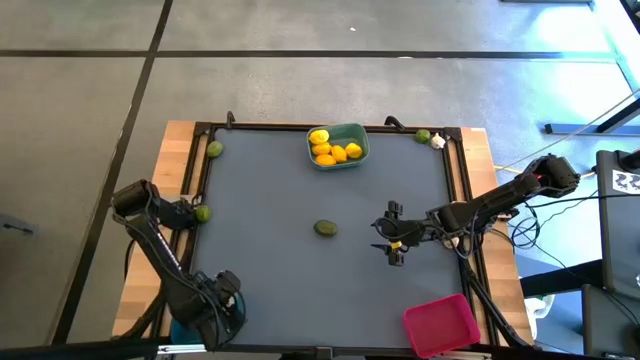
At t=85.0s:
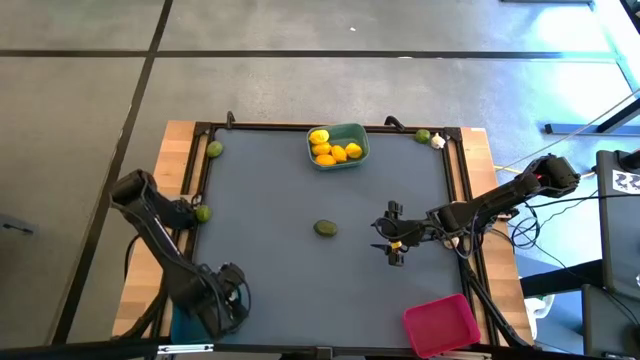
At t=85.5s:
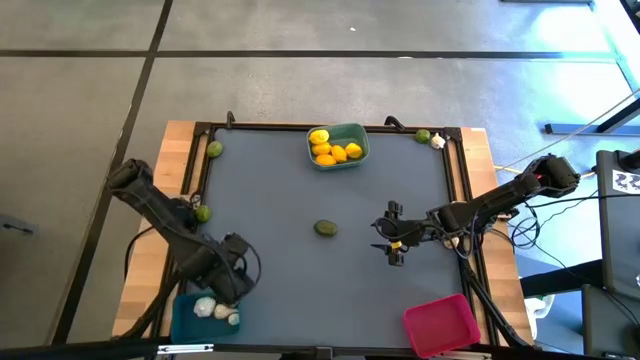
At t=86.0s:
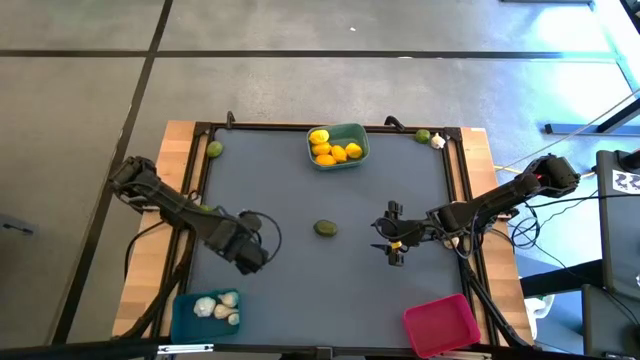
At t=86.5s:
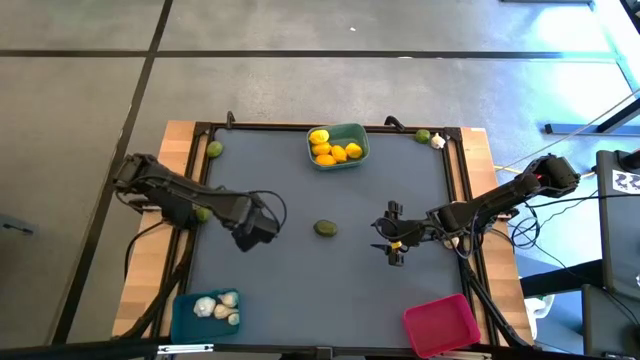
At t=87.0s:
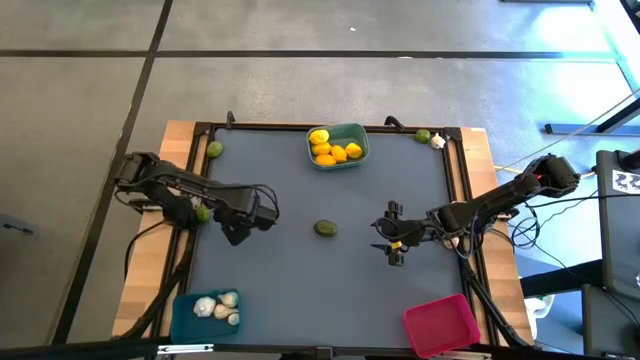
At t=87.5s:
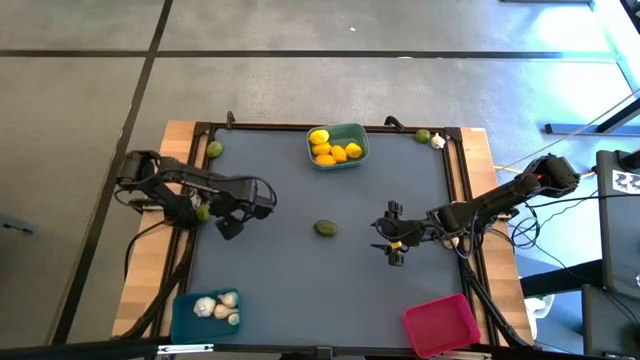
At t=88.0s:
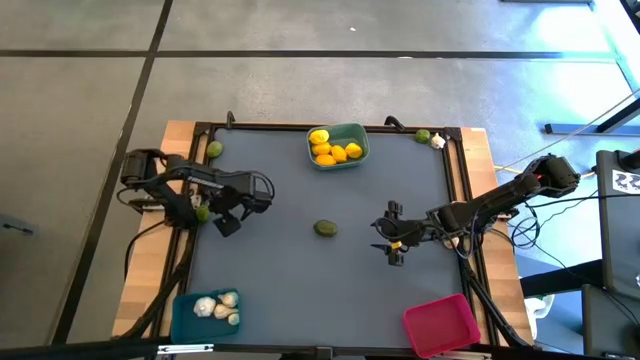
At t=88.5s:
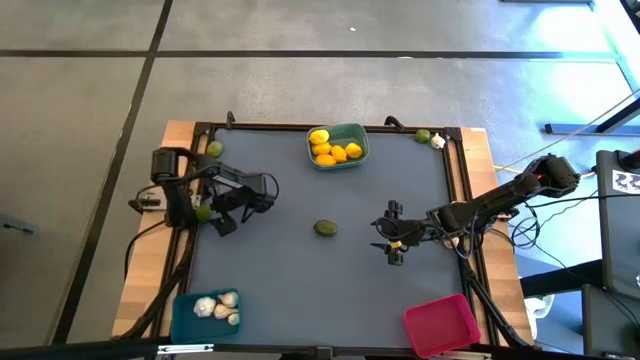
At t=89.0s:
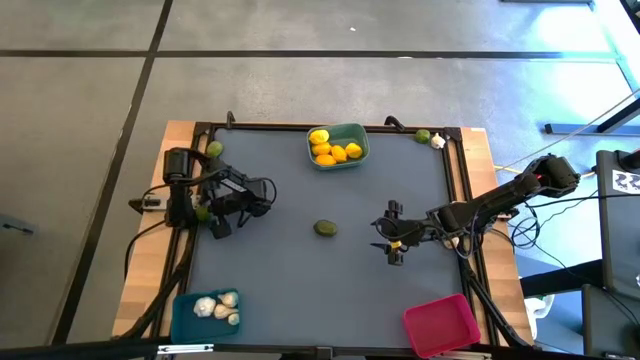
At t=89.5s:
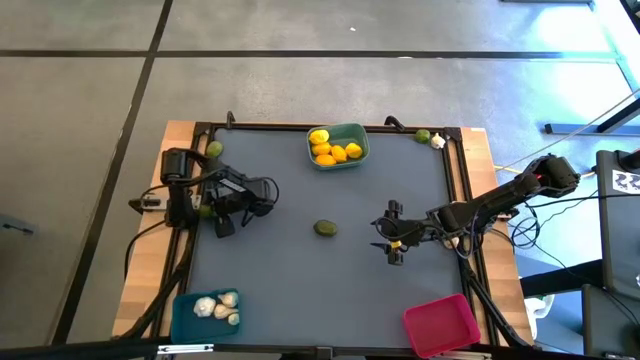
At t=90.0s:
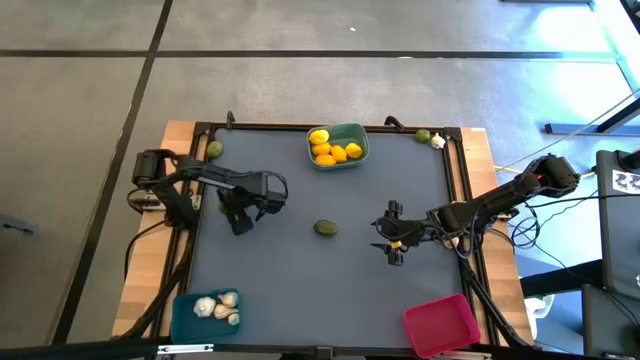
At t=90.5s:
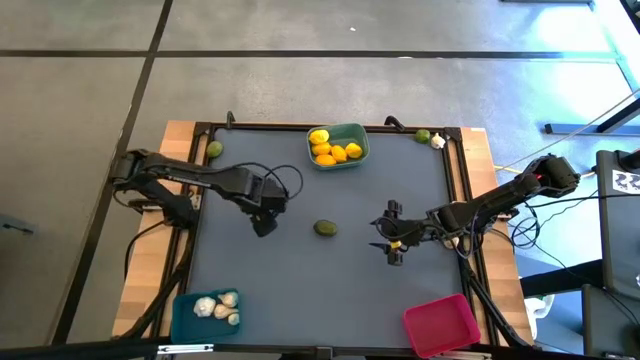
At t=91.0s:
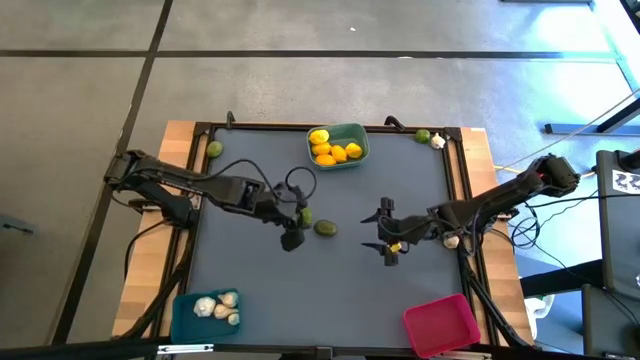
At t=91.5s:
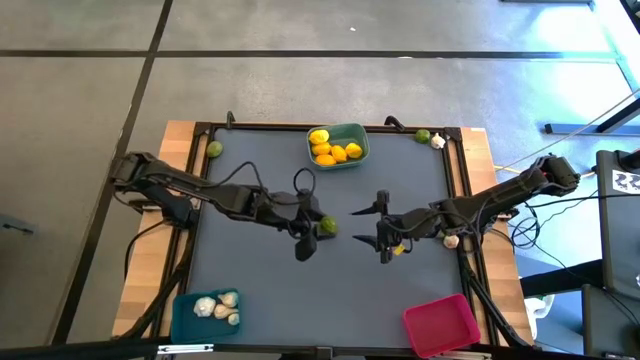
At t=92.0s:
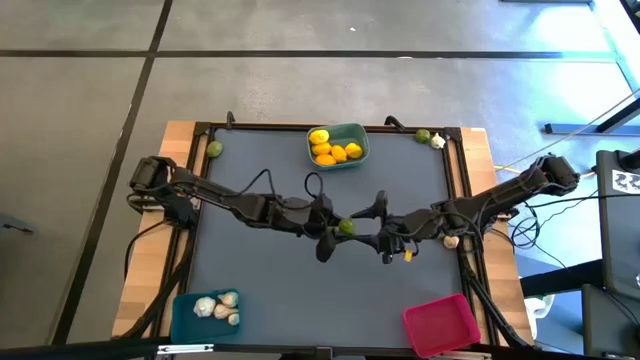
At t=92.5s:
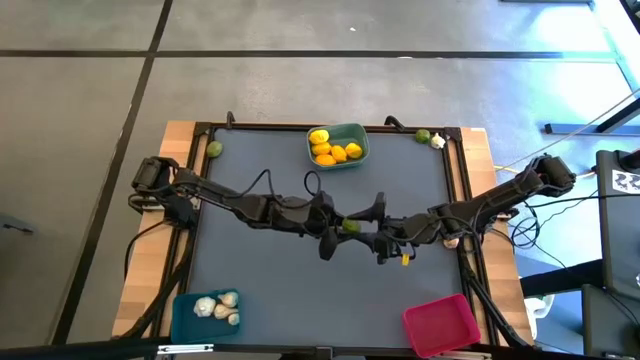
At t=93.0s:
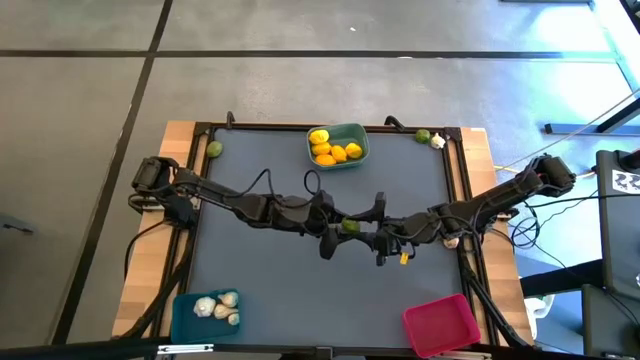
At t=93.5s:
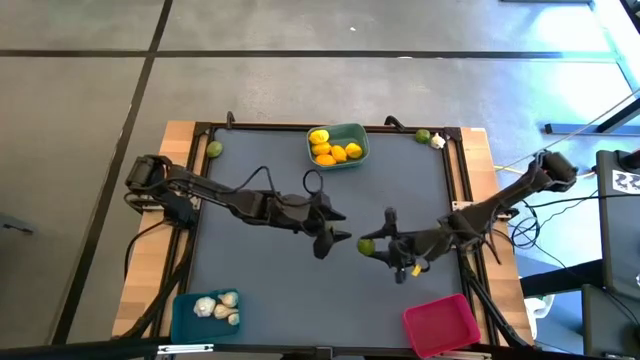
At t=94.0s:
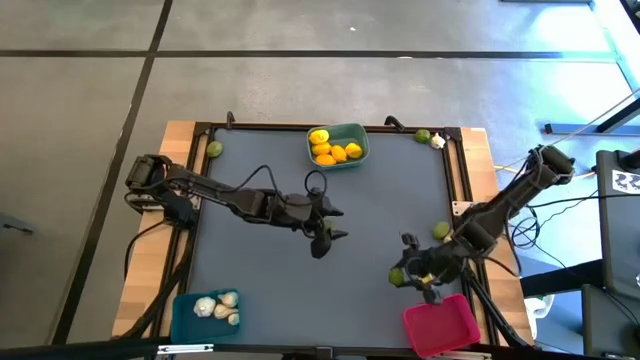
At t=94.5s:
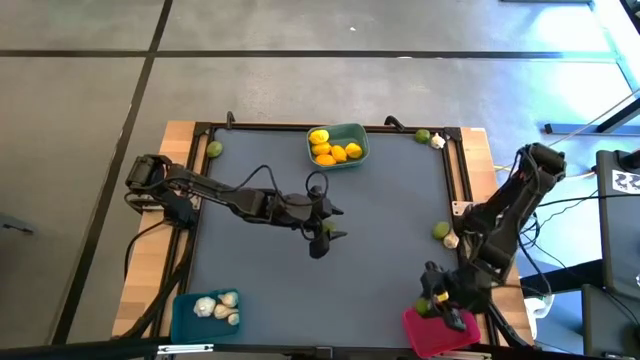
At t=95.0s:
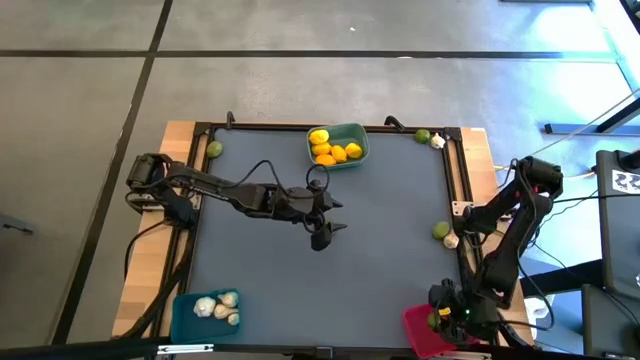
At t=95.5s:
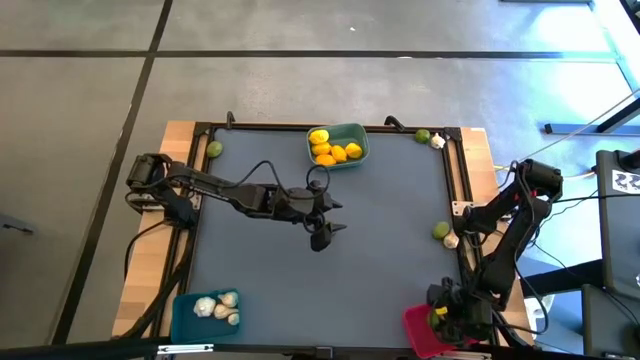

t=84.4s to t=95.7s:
Task: Sort produce into baskets
Put the green lime into the pink bin

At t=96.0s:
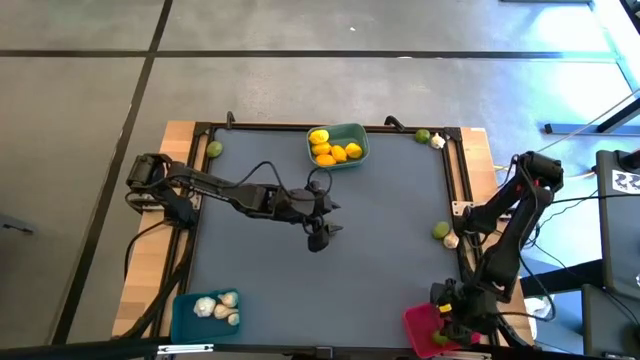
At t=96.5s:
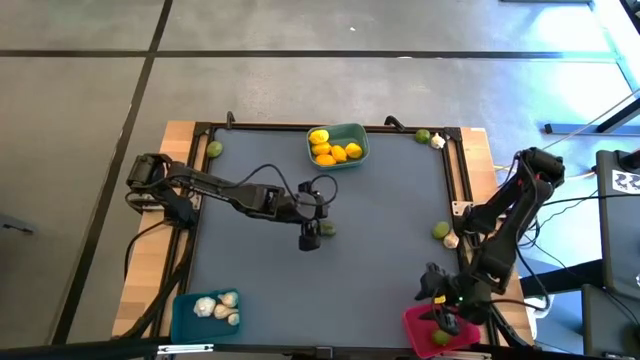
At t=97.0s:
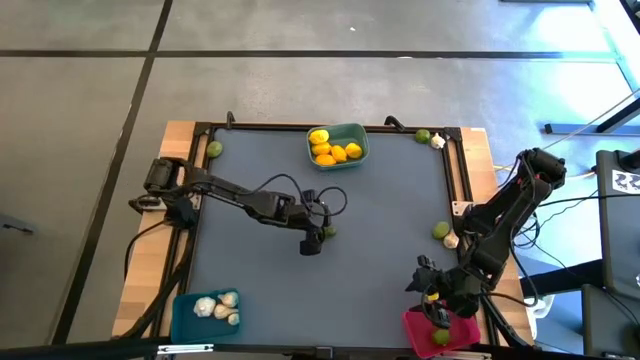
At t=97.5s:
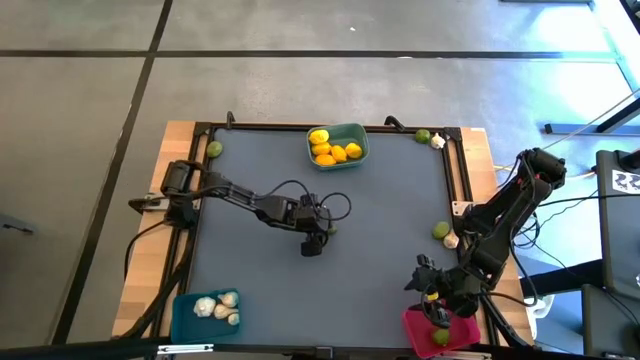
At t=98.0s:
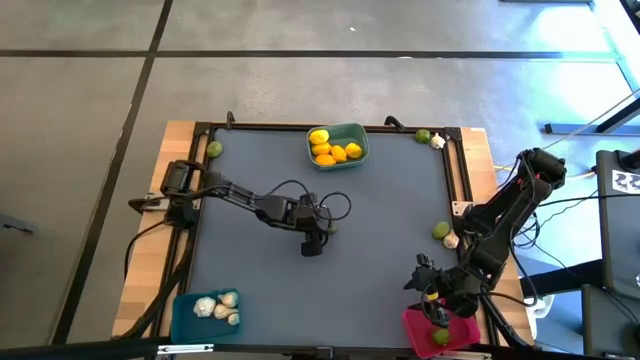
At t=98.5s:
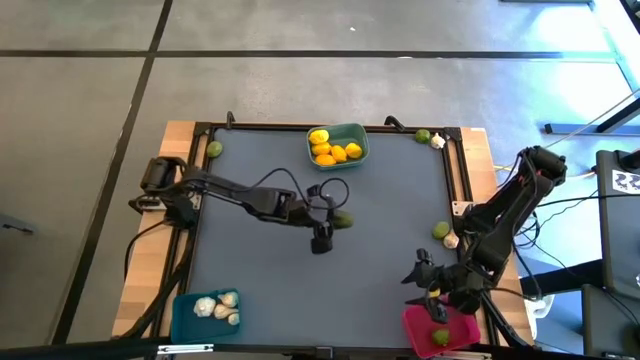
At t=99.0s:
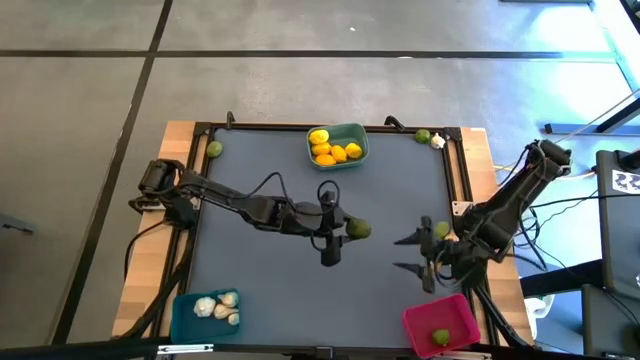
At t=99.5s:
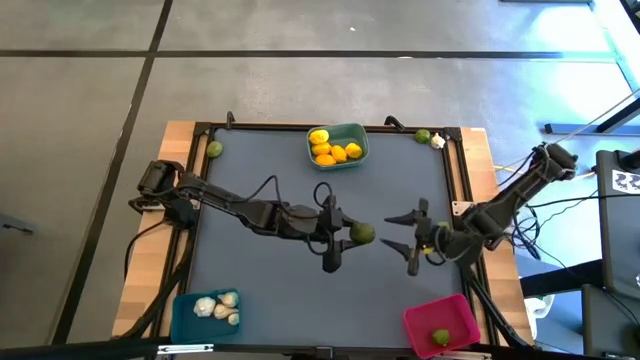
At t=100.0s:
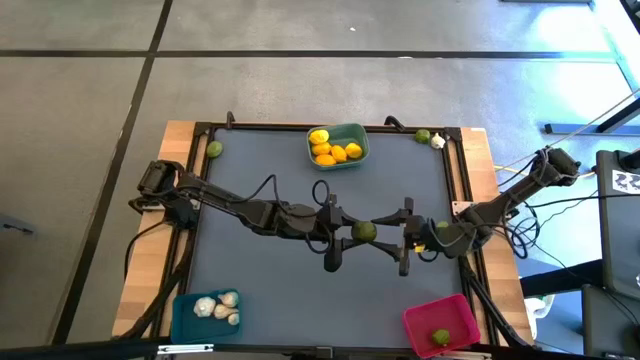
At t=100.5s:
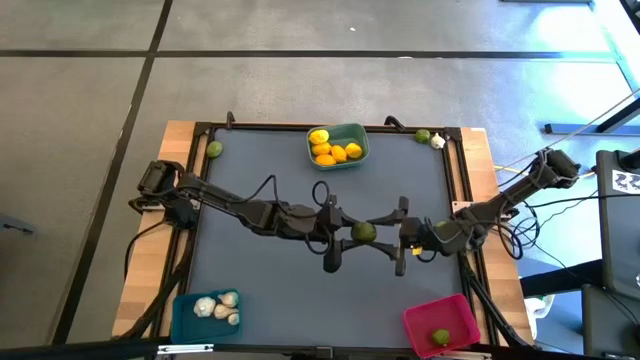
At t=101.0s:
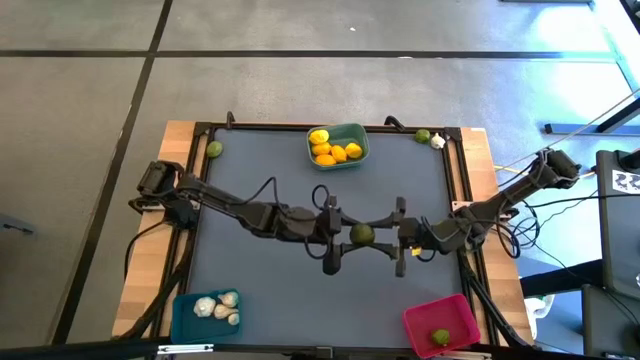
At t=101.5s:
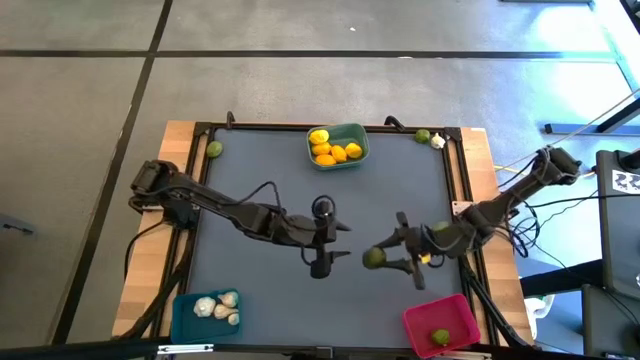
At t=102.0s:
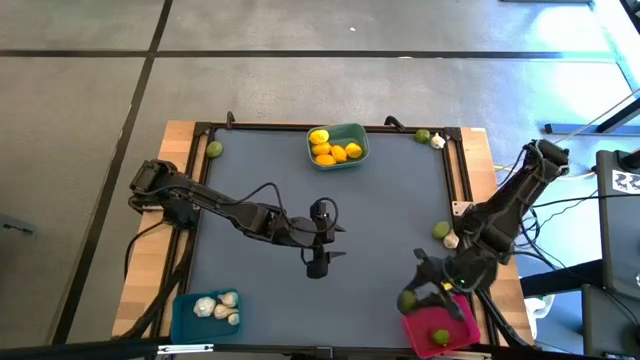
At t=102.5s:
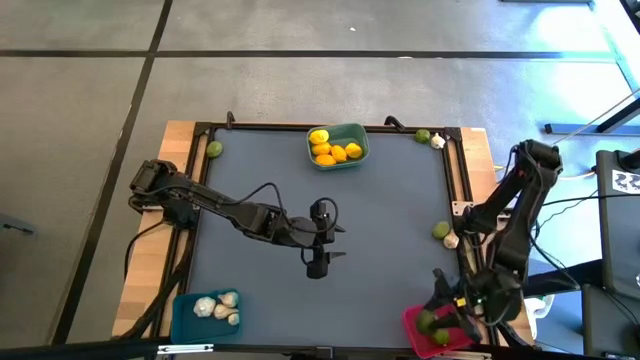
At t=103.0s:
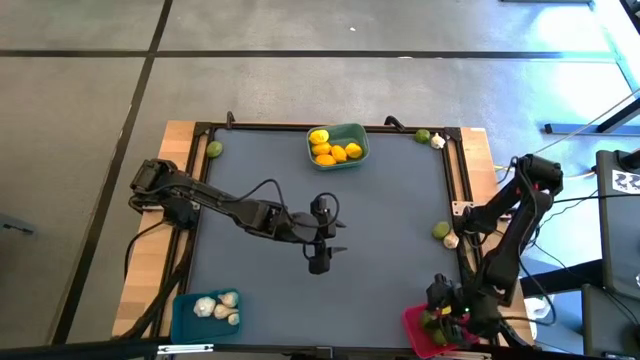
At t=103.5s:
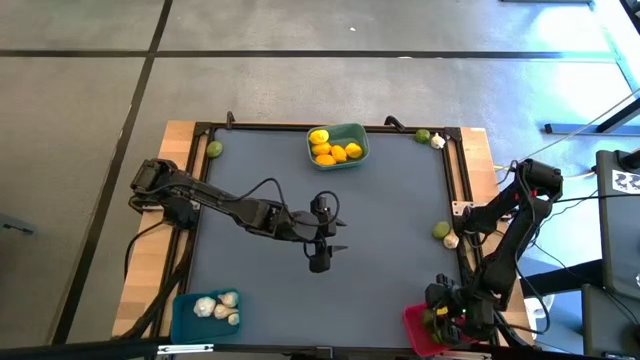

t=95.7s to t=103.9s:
Put the green lime into the pink bin

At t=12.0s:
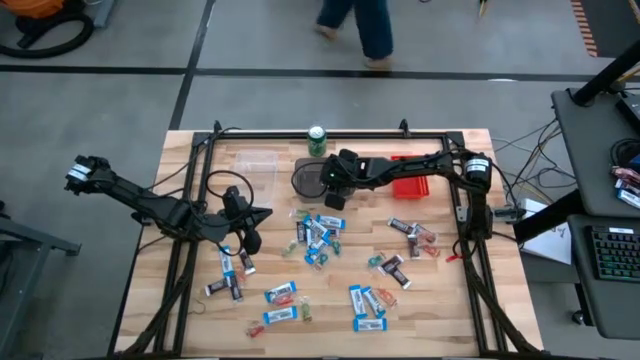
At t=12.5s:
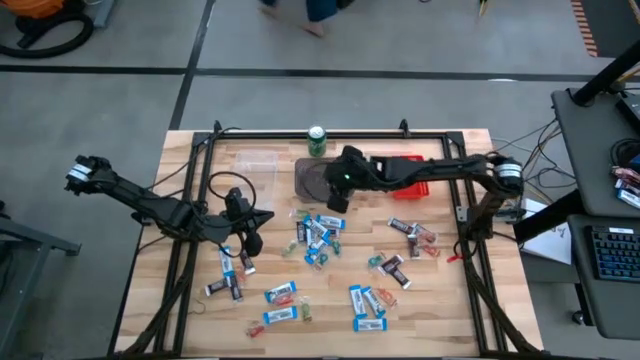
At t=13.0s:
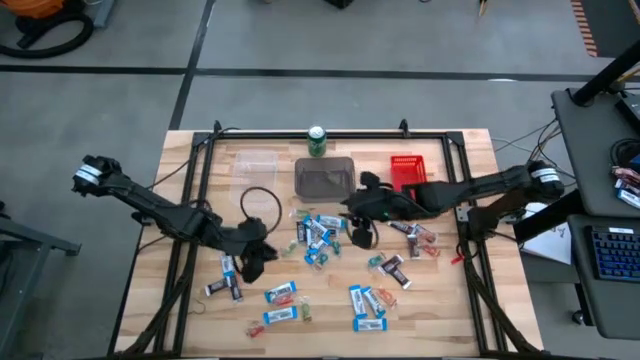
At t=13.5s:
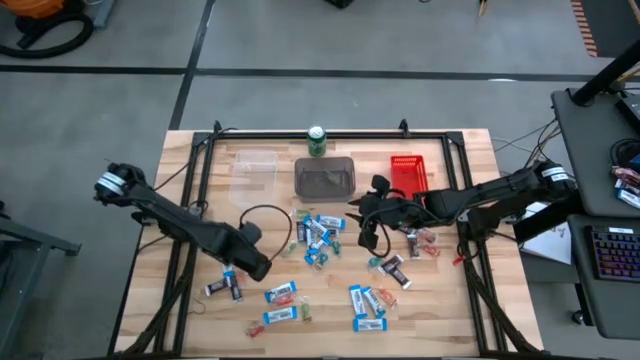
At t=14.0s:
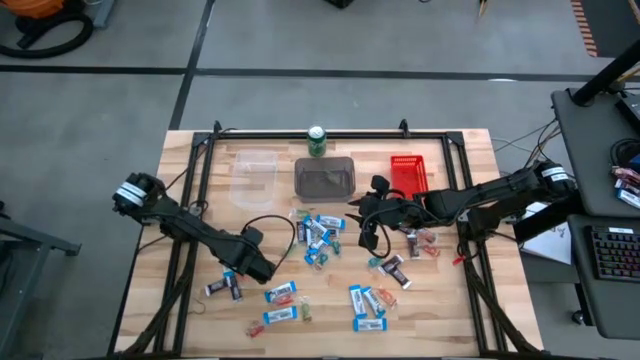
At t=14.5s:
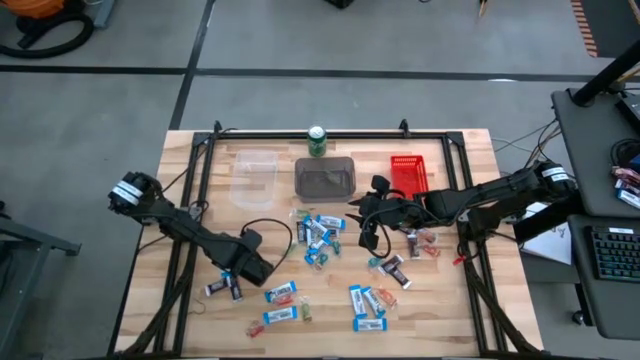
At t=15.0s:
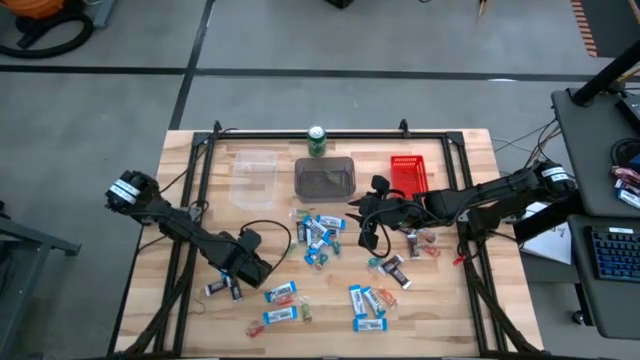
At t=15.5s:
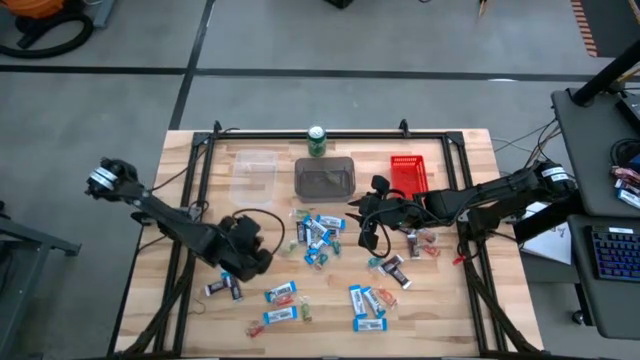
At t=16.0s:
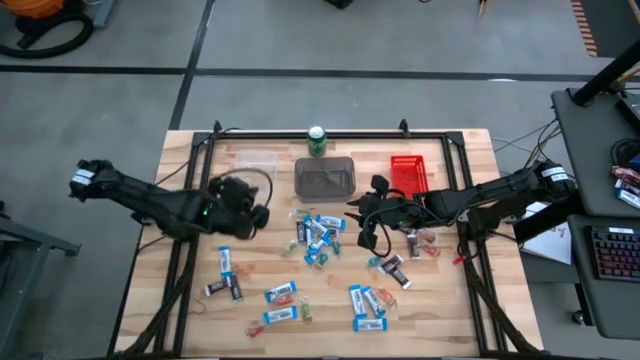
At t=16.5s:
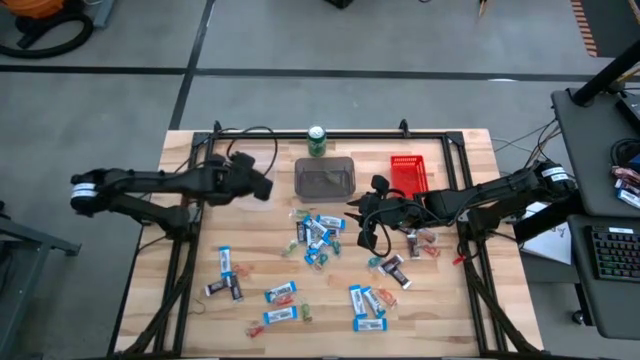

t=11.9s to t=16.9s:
Task: Organize candy in baskets
Put the brown chocolate bar into the transparent bin
